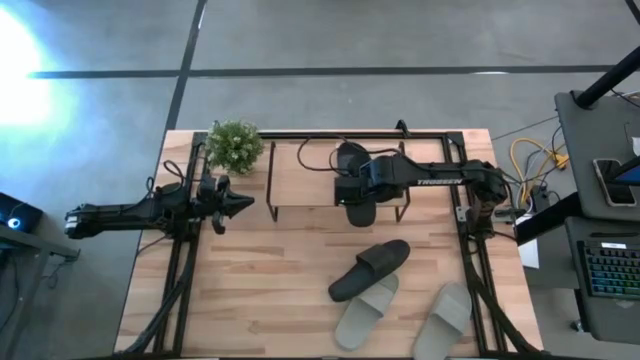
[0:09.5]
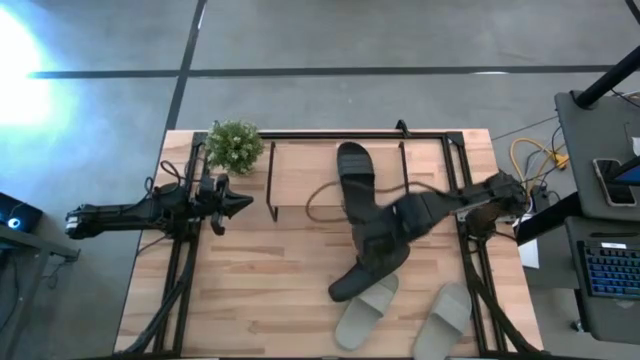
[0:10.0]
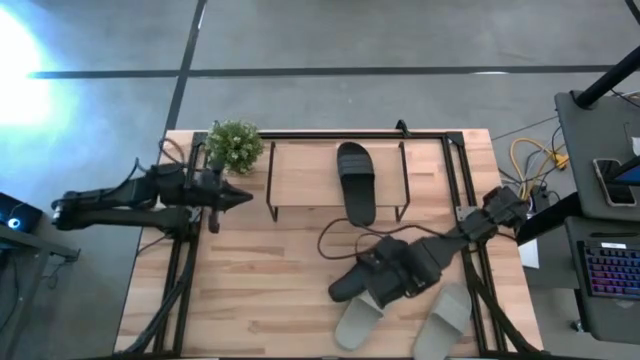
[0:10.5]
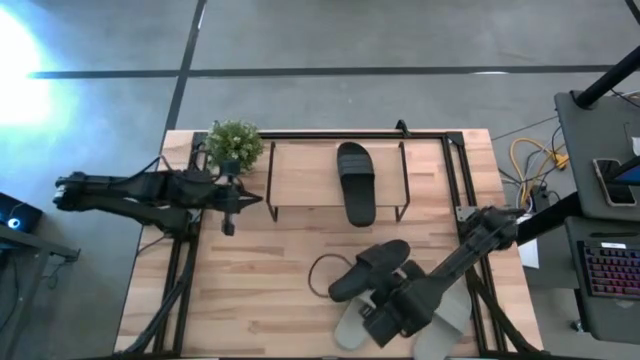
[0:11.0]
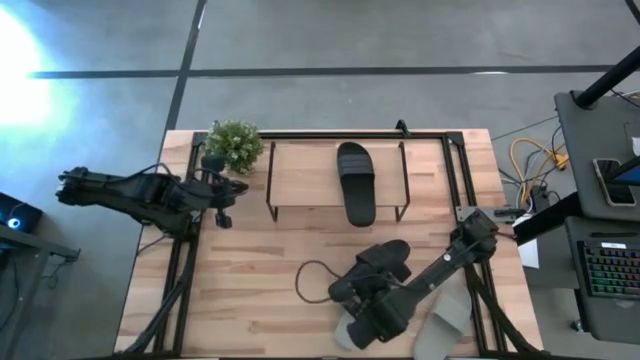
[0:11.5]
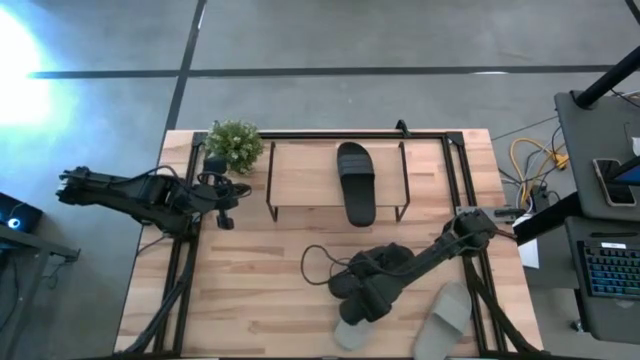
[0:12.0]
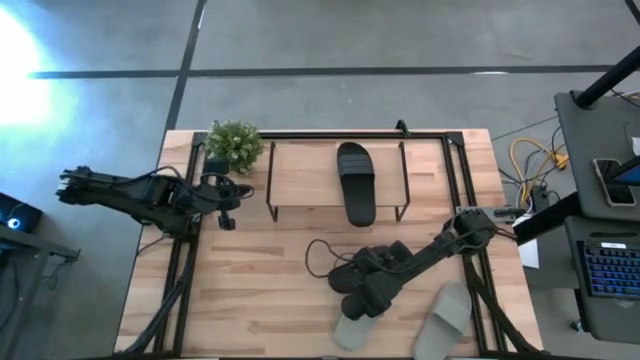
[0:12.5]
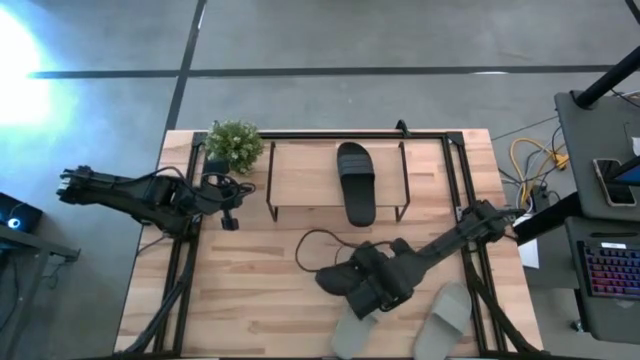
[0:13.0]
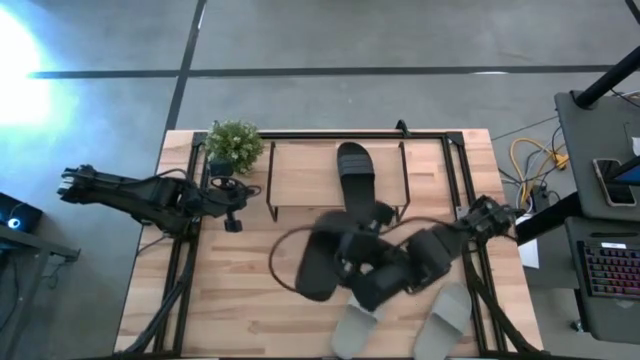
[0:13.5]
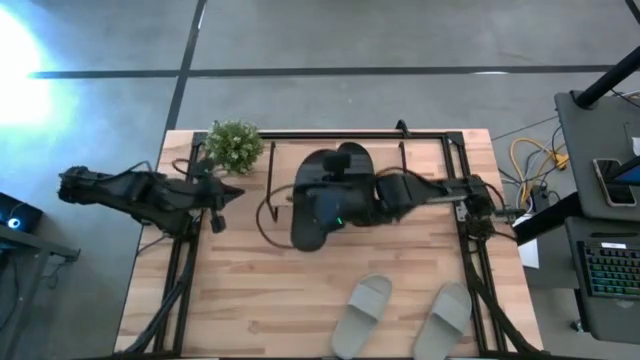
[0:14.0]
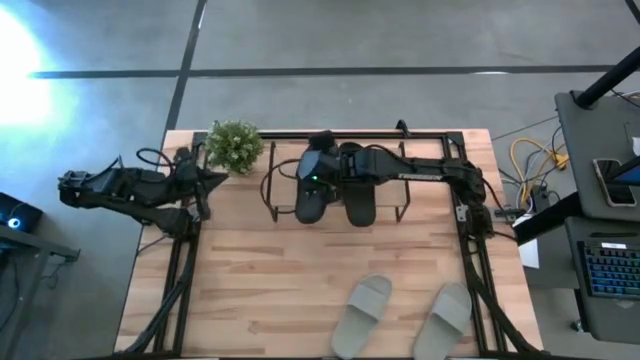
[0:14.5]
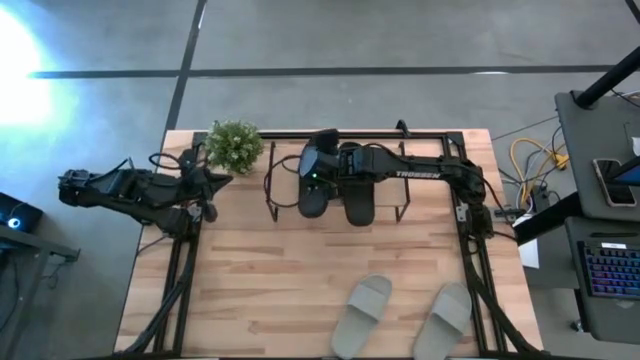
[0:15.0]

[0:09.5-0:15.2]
Task: Pick and place slides into the shelf
Put the black slide to the left of the other black slide on the shelf

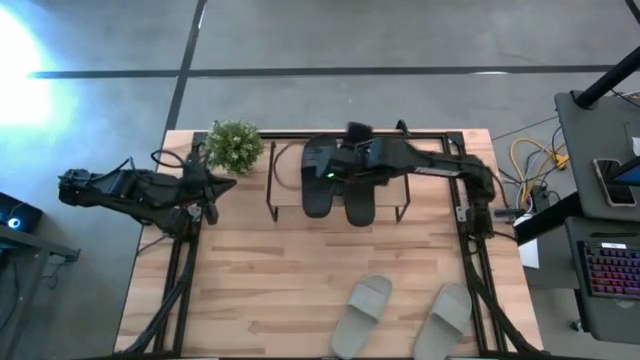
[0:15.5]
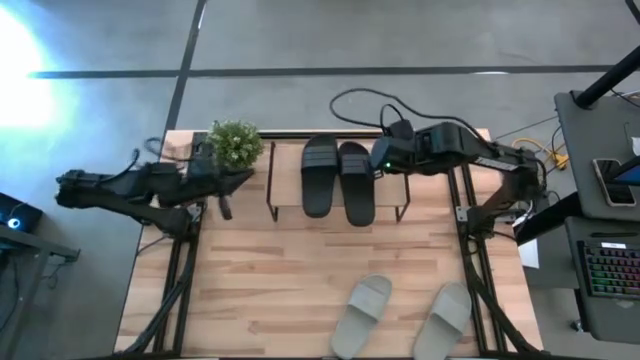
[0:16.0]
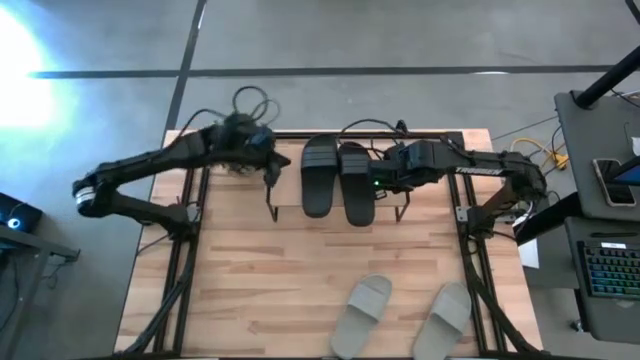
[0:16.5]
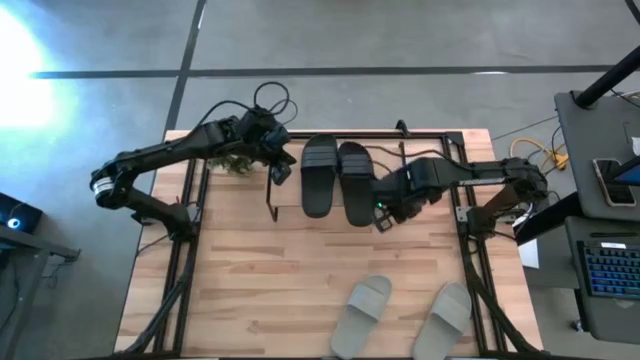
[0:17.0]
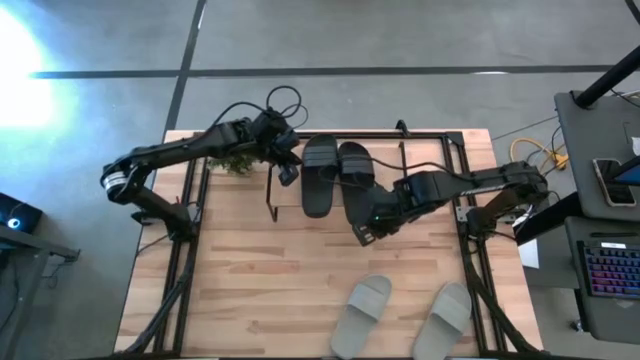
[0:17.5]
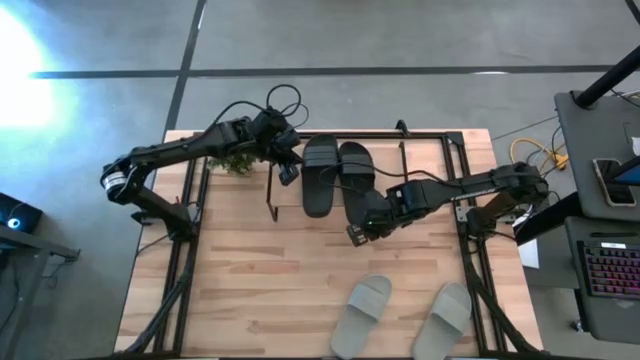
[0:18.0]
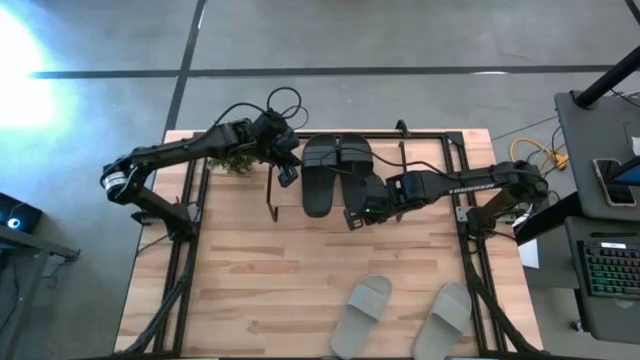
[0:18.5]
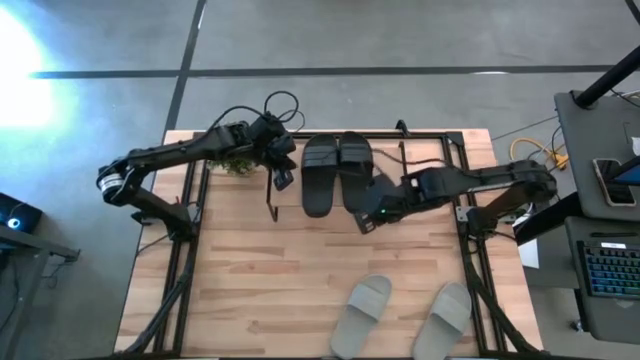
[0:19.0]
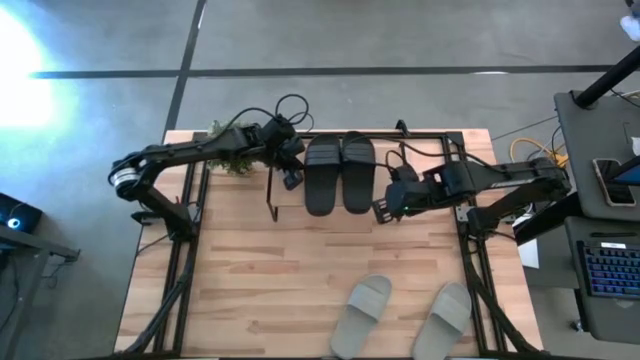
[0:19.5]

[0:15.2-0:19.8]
Adjust the black slides on the shelf

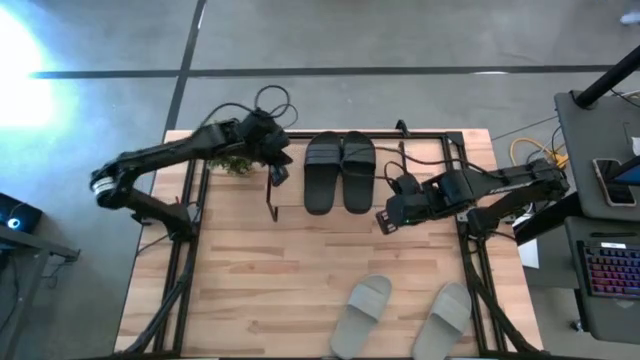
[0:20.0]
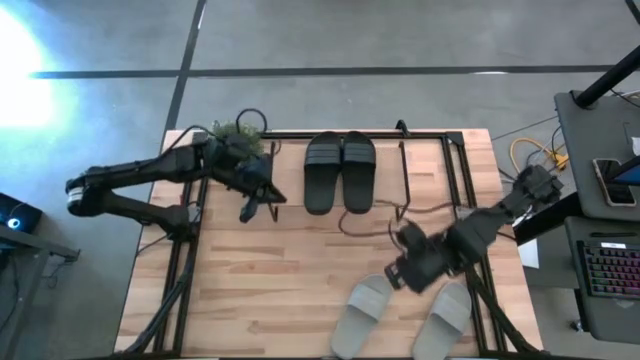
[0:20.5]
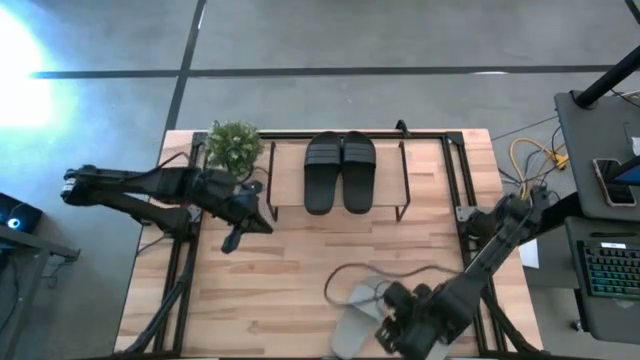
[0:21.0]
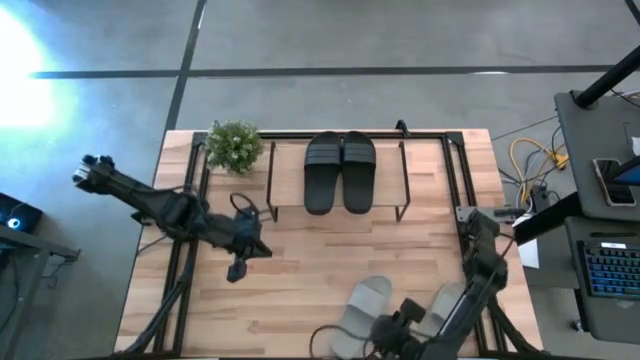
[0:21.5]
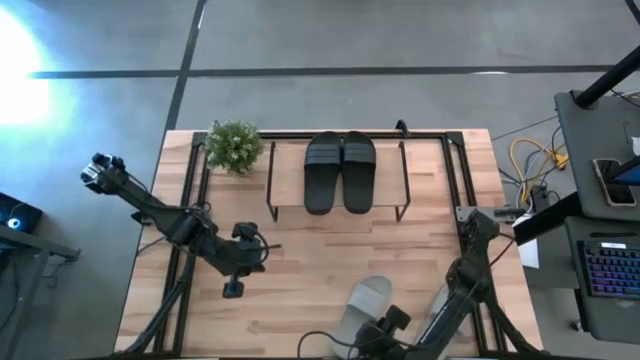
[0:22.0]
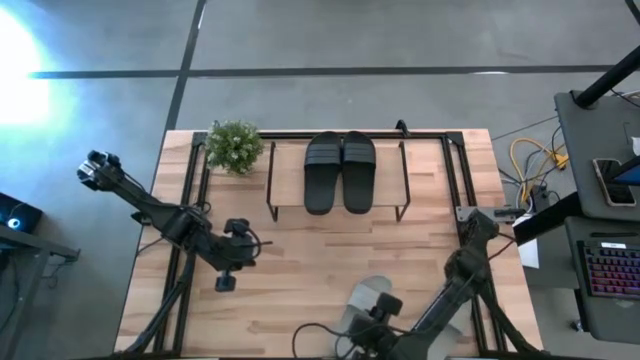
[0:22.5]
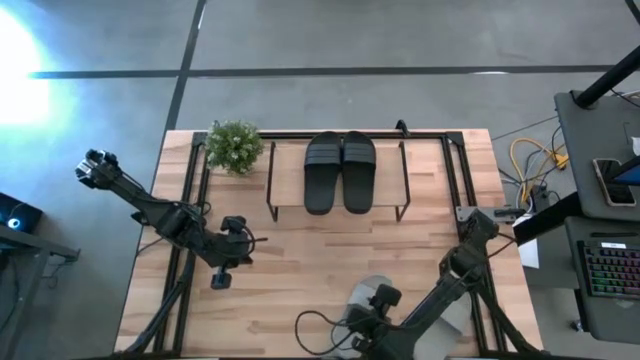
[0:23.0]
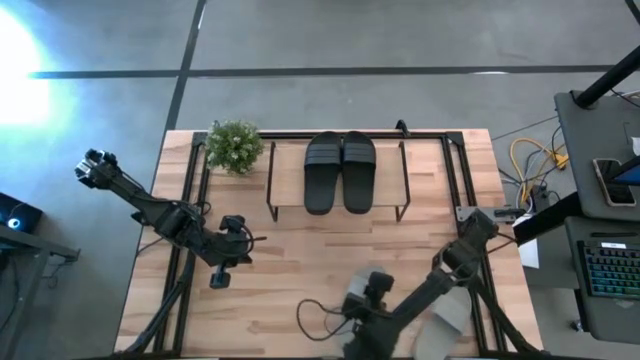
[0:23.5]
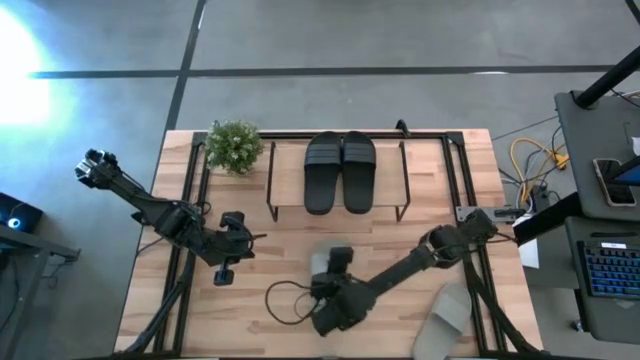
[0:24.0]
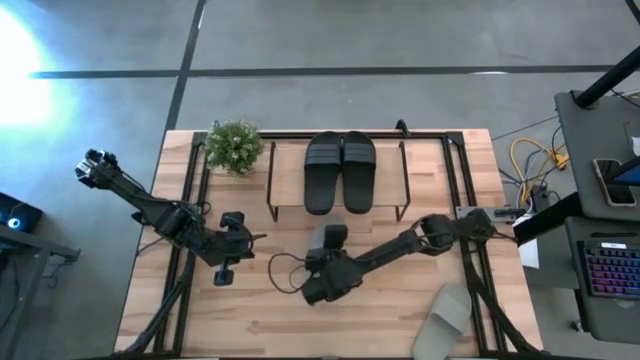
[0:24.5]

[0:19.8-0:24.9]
Move the left gray slides to the center of the table

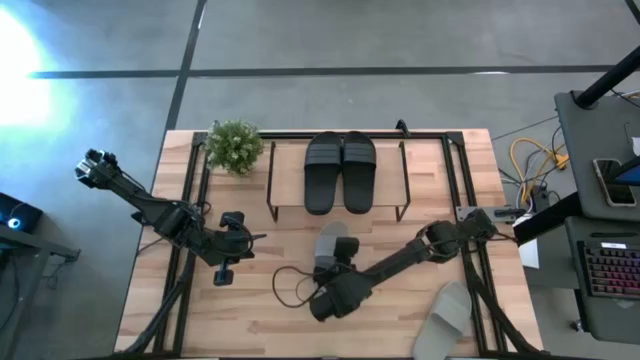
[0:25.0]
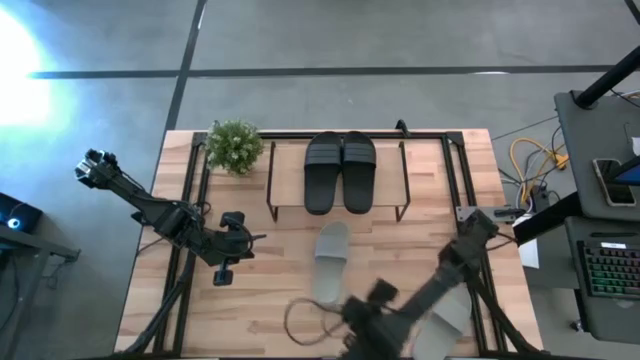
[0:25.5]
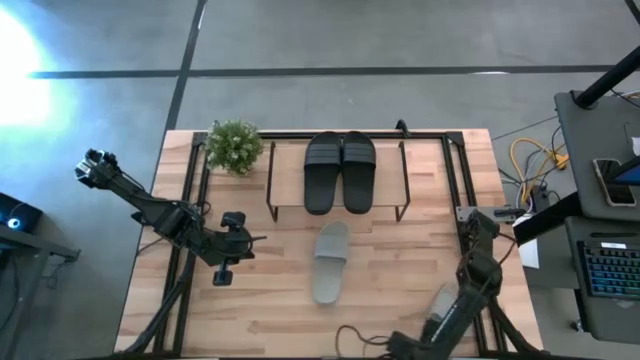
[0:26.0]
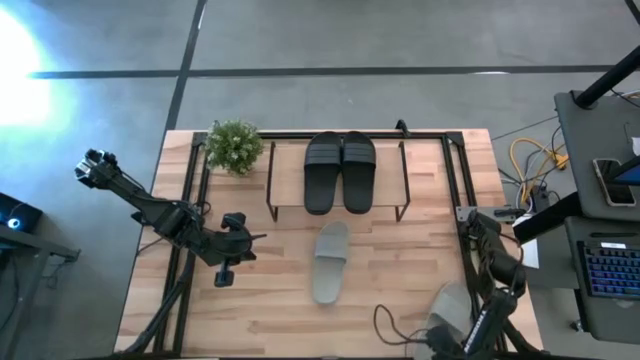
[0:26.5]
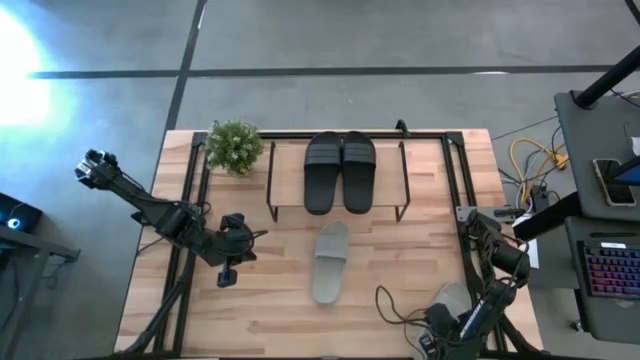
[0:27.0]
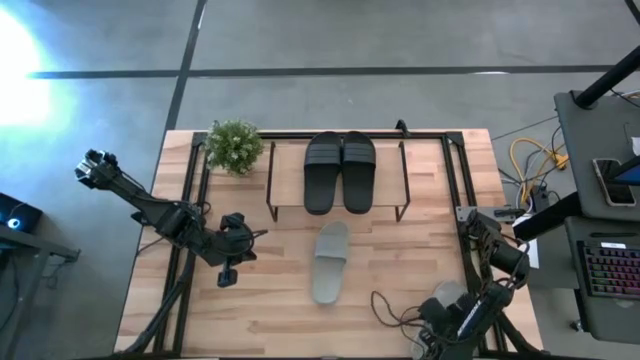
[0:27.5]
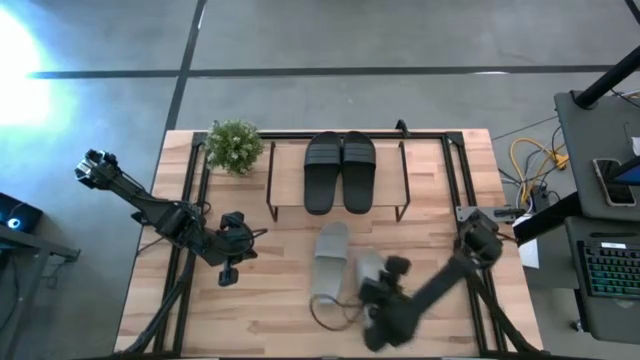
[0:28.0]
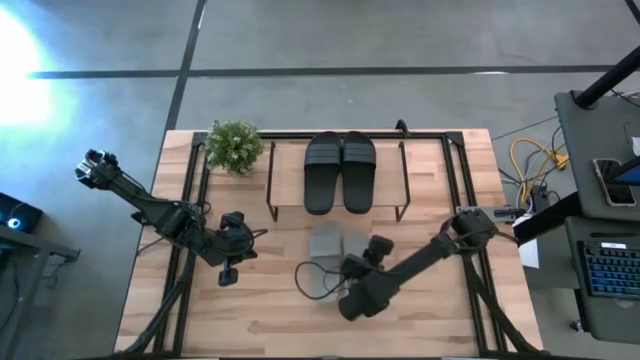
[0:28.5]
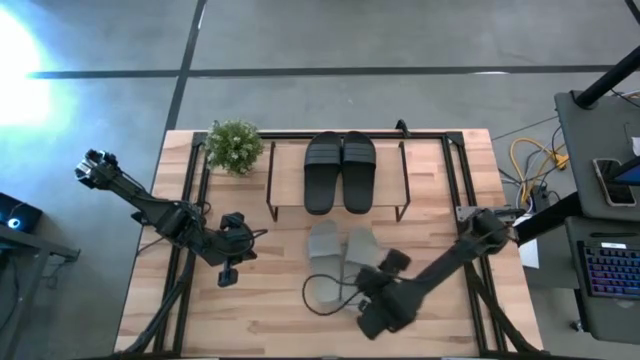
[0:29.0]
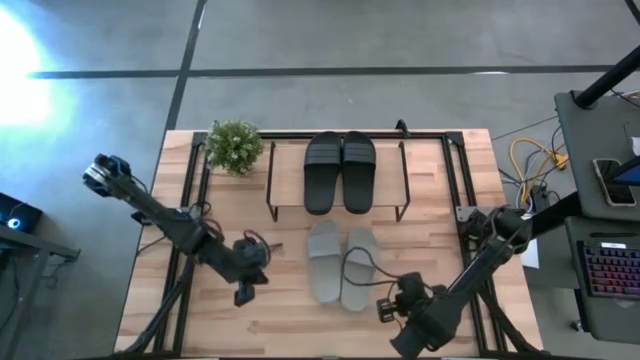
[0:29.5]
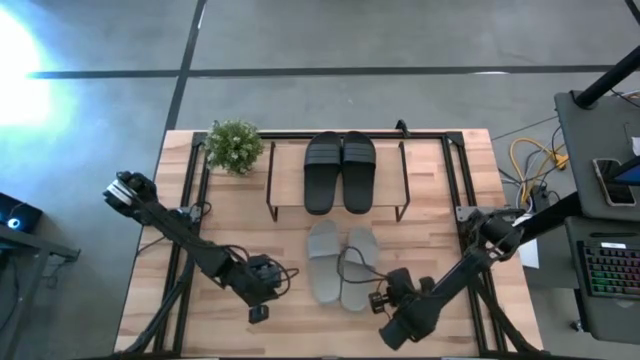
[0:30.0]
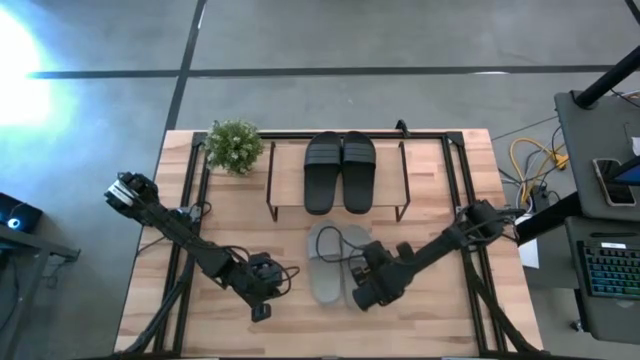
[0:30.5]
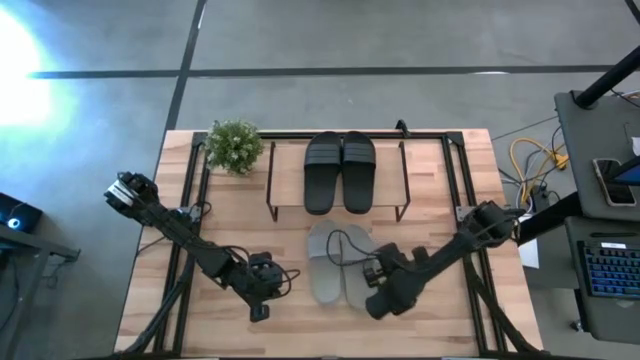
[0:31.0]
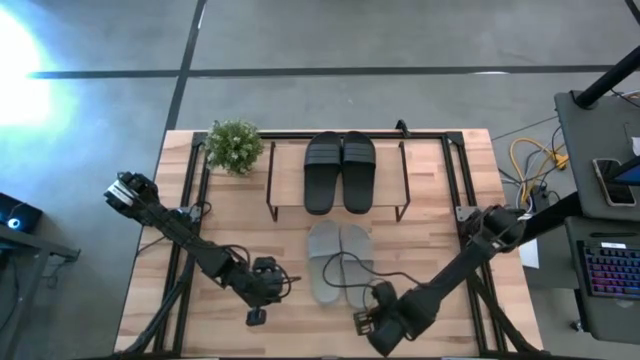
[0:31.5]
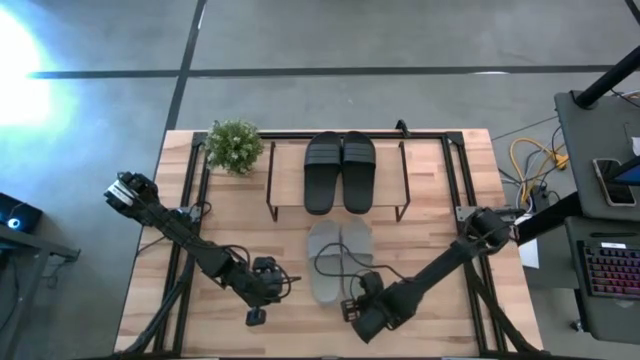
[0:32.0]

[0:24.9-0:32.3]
Move the right gray slide to the center of the table beside the gray slide
